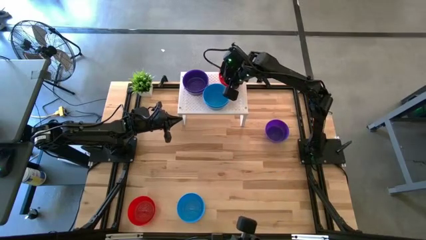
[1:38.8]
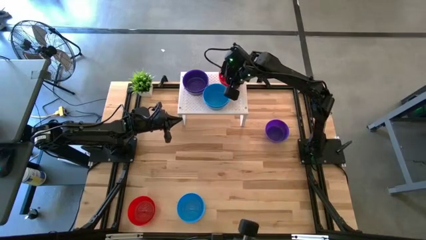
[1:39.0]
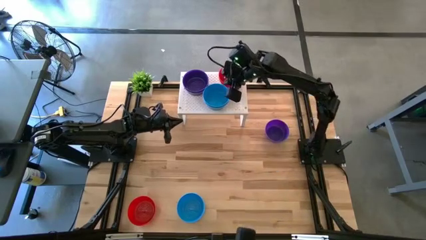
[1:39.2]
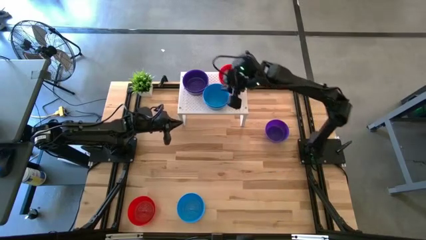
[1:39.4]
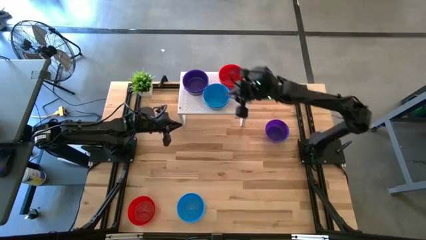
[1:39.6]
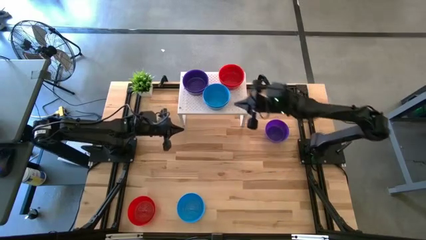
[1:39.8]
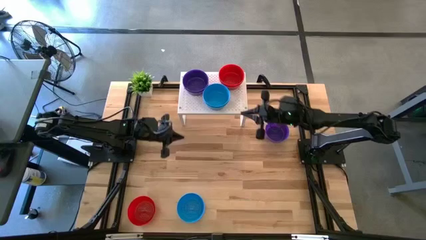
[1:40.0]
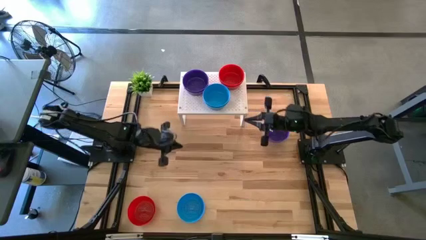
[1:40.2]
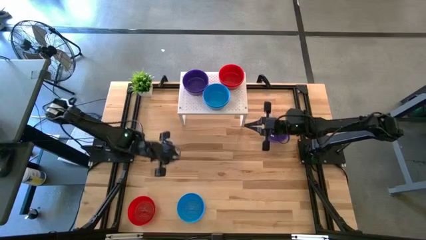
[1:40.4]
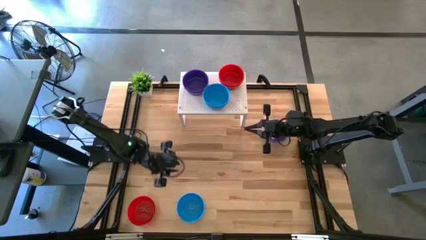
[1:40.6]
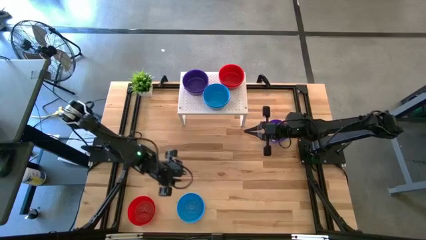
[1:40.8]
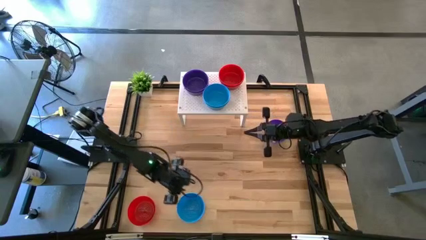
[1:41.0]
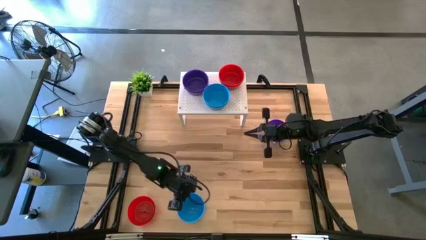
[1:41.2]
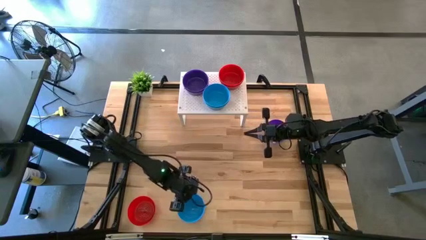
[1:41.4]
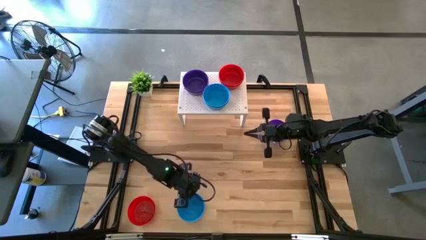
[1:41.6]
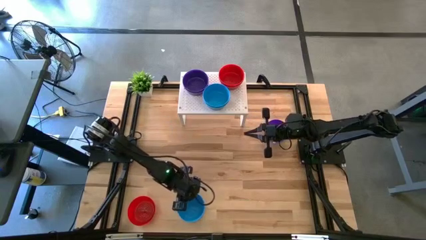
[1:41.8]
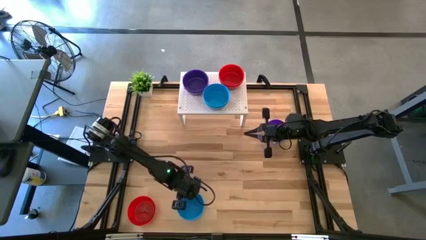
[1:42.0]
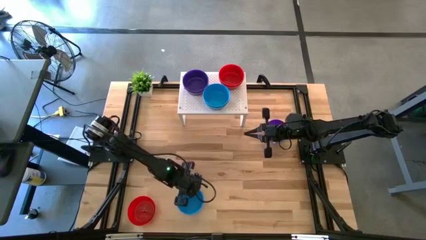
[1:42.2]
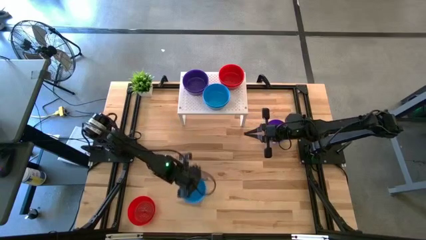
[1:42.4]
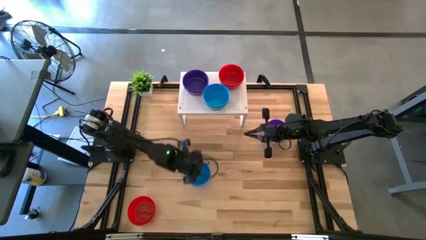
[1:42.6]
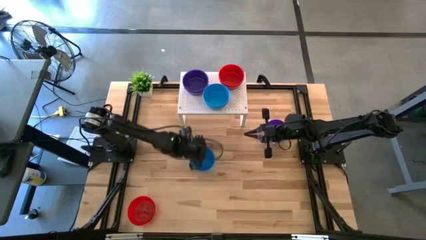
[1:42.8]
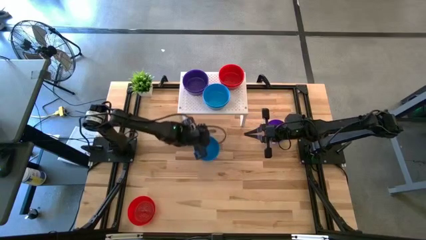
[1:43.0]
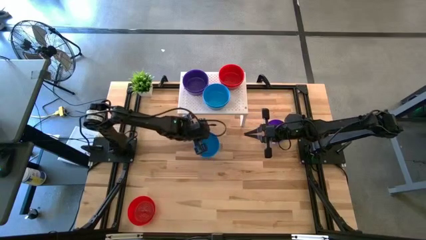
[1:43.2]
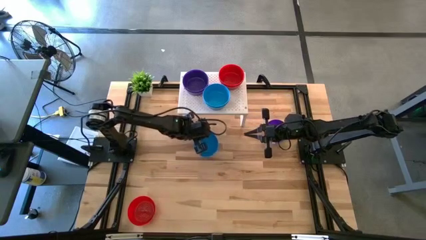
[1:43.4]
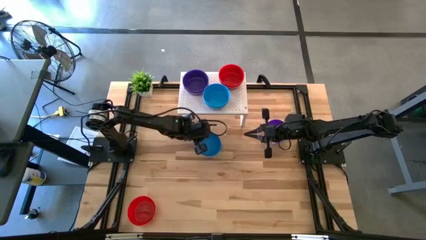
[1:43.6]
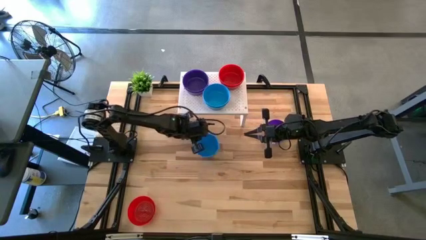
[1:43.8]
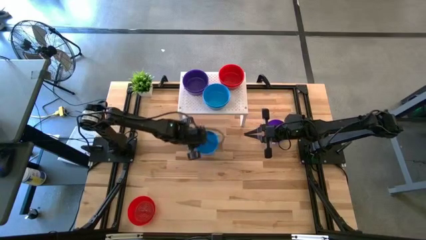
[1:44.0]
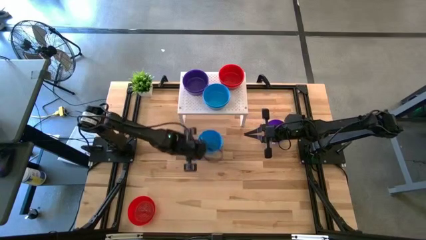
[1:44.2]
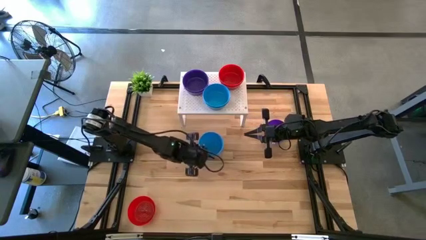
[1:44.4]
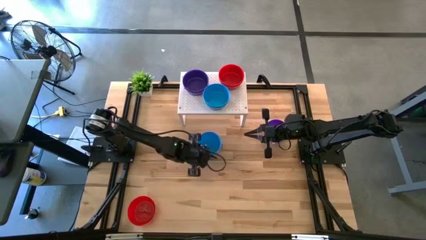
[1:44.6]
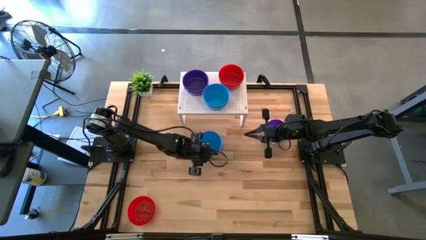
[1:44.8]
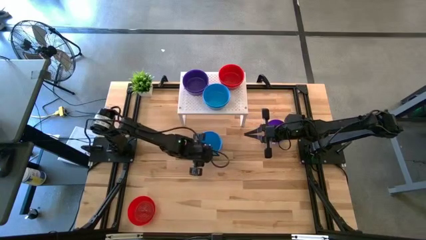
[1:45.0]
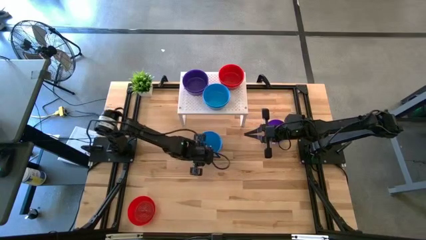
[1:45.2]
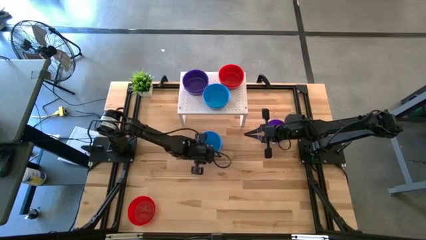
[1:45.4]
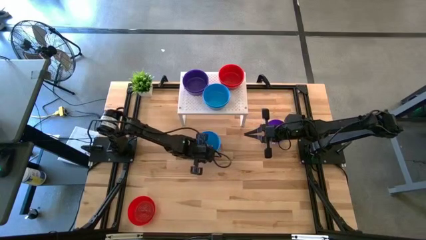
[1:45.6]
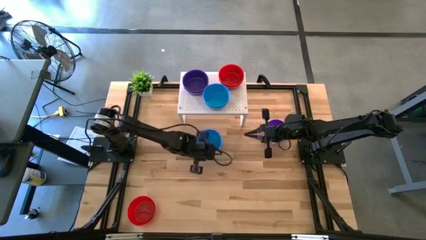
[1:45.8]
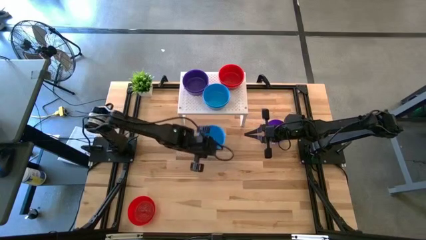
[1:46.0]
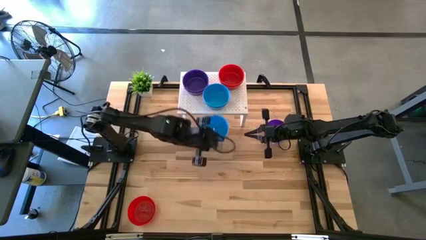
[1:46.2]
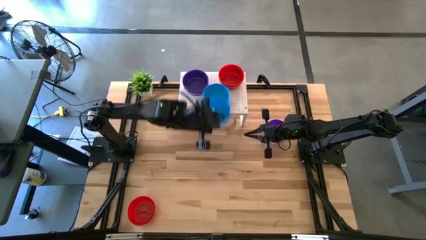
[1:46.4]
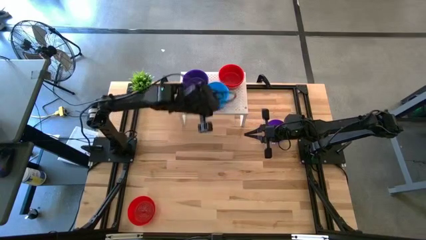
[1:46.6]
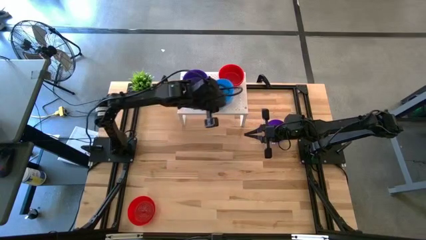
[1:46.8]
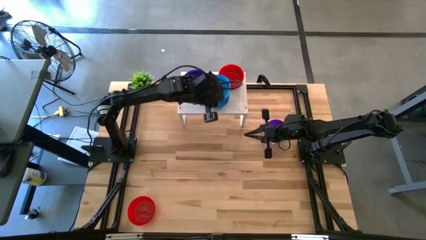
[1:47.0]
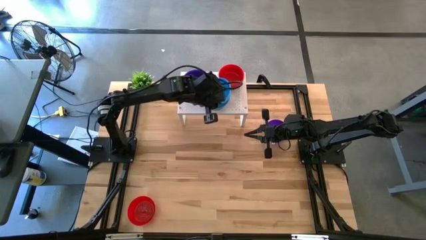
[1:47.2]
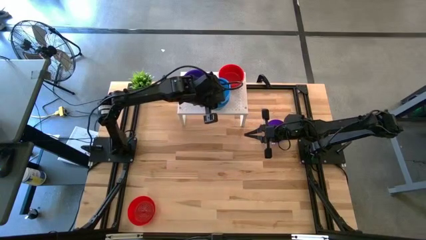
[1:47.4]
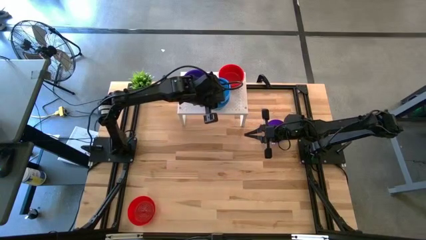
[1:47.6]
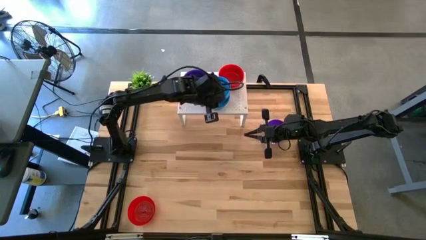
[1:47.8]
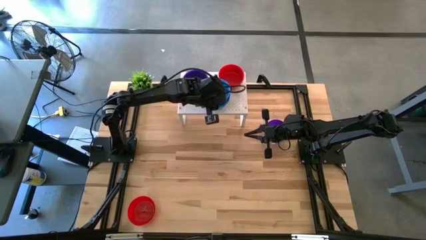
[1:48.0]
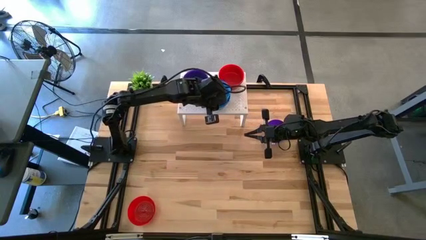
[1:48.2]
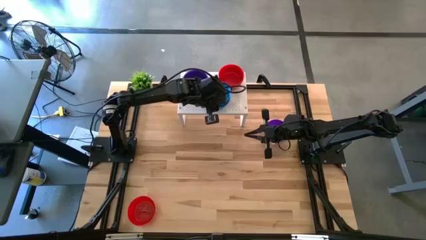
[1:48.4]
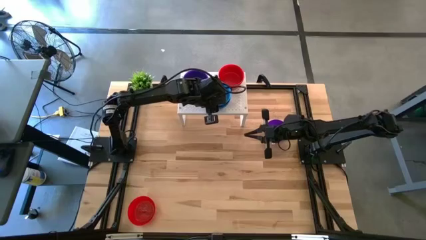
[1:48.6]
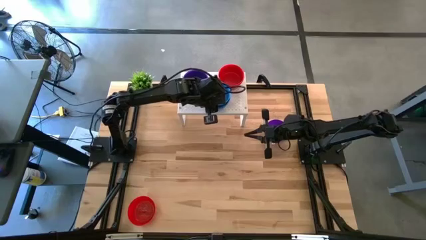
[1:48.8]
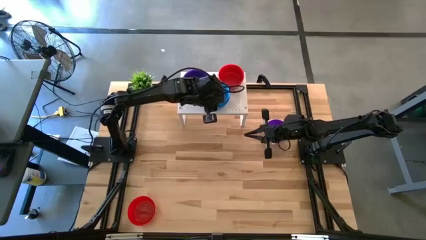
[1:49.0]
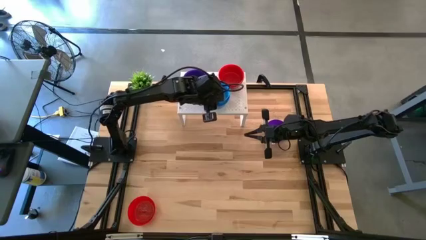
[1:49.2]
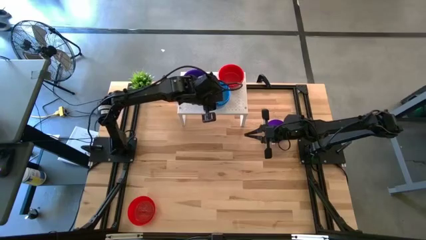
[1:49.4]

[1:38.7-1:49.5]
Task: Pick & Place Mini bowls
Stack the blue bowl on the blue bowl on the shelf

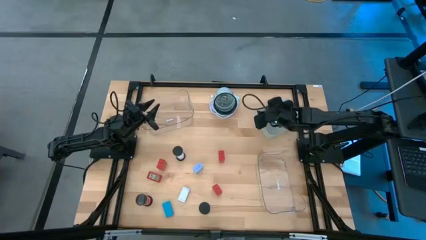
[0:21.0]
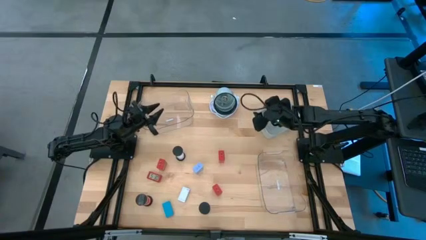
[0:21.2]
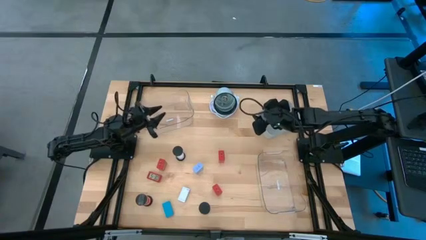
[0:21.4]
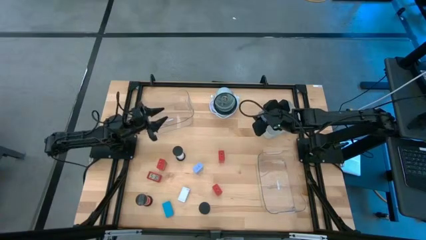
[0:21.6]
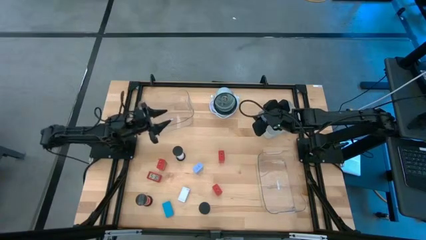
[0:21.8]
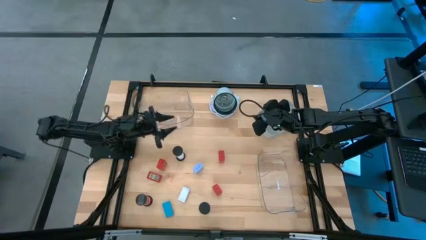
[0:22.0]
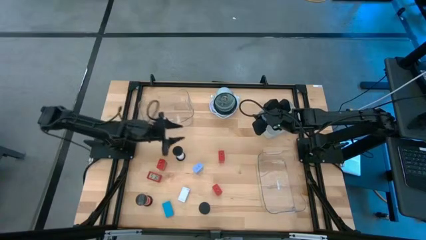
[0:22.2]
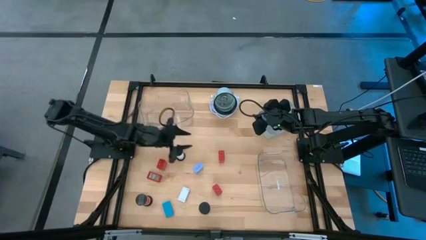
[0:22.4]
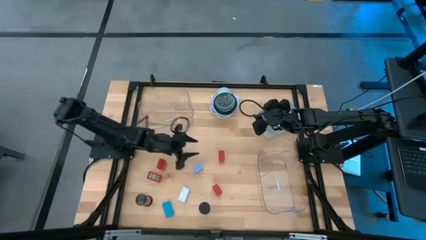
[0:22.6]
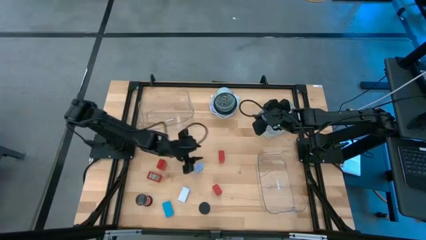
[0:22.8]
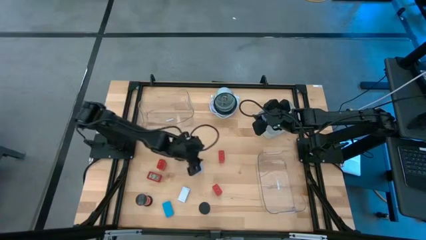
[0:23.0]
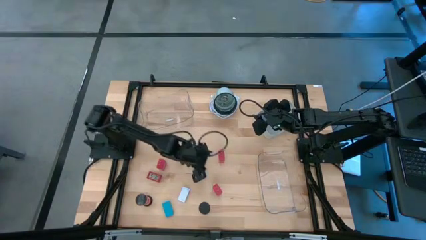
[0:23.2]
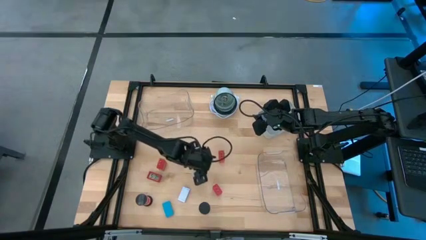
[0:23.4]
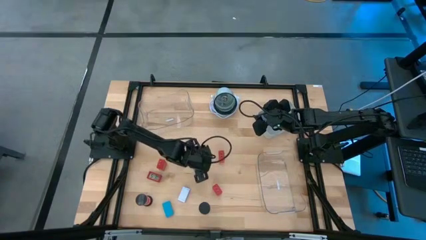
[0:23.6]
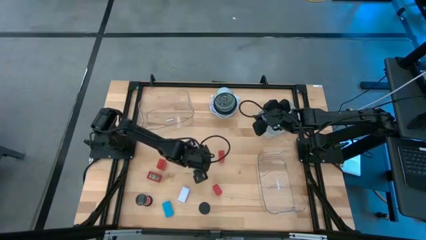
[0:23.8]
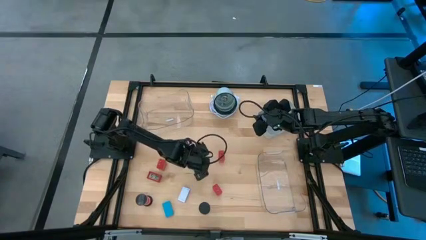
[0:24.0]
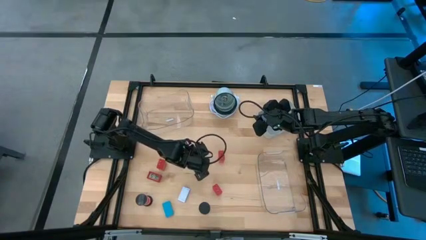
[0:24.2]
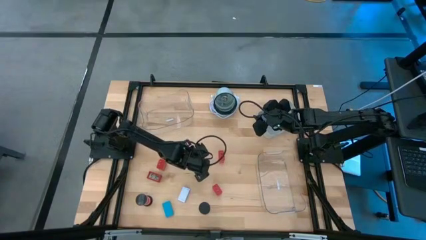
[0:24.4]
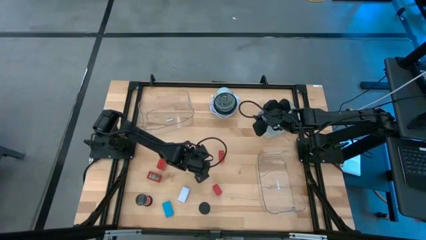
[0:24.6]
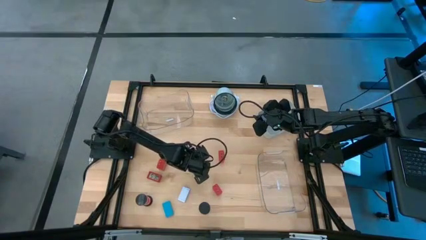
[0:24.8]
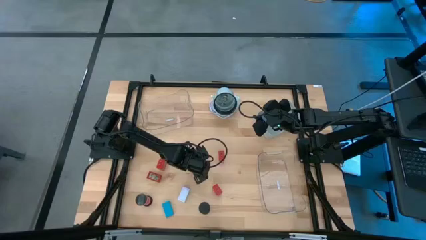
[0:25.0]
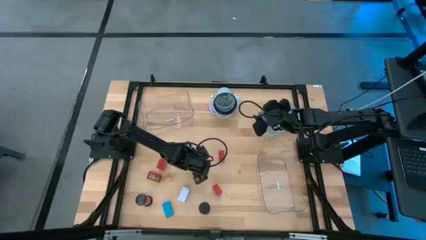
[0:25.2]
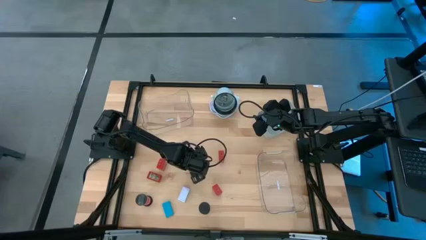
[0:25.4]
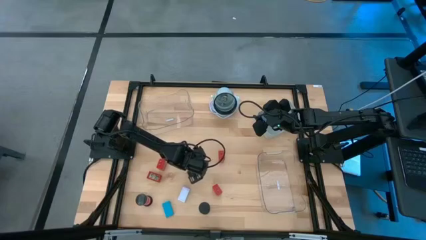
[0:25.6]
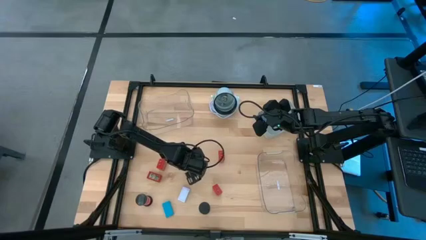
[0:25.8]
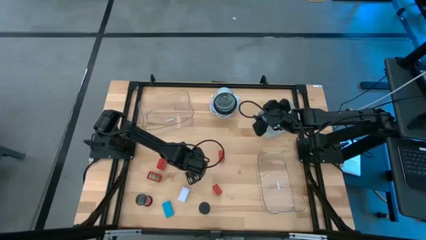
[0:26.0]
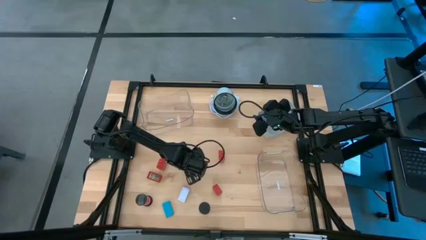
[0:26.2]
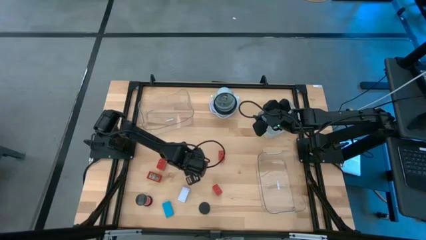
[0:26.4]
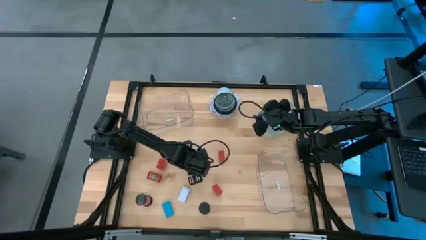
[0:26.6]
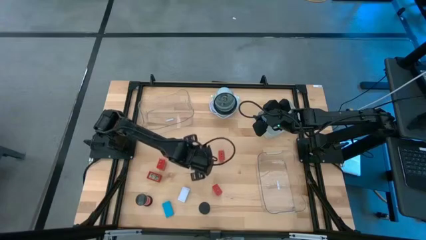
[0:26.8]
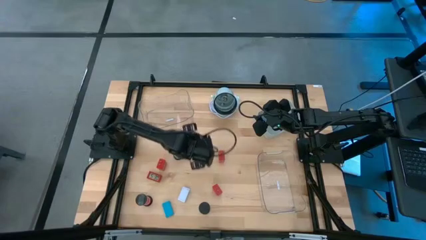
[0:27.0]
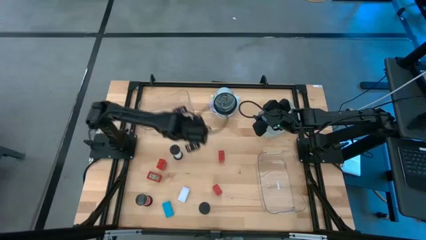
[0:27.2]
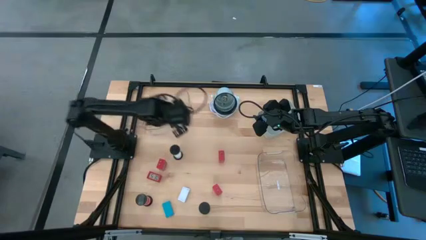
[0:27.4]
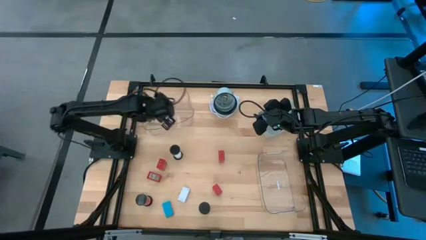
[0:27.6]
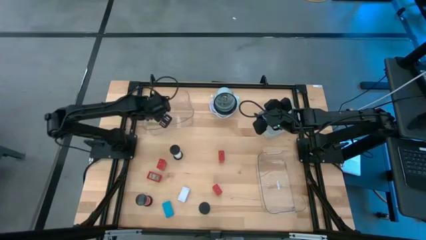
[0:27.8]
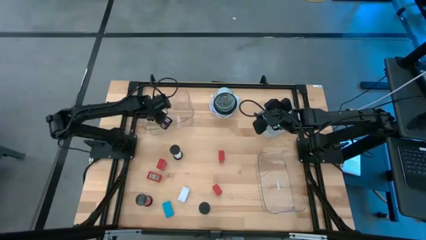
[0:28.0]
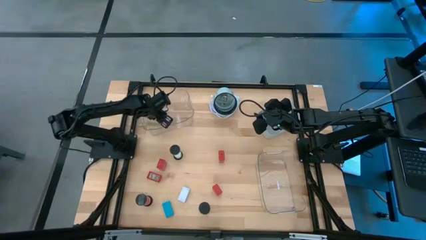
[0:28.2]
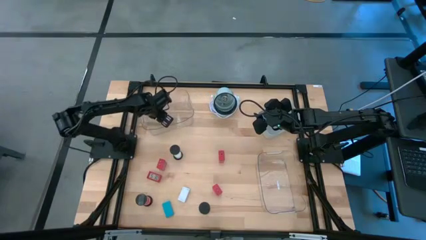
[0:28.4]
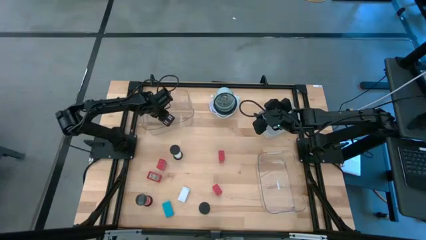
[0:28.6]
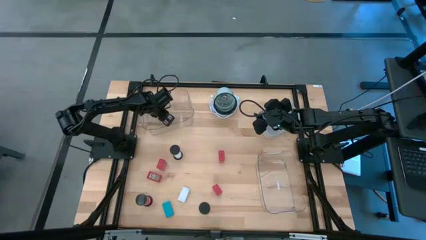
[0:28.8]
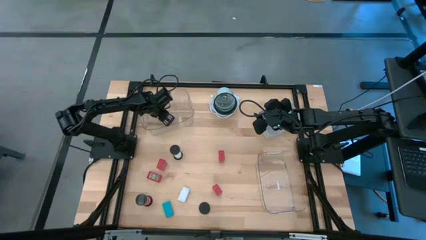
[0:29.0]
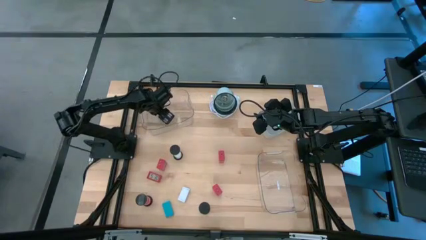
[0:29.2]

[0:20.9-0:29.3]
Task: Pick & Place Office items
Put the blue charger adapter into the left transparent bin
